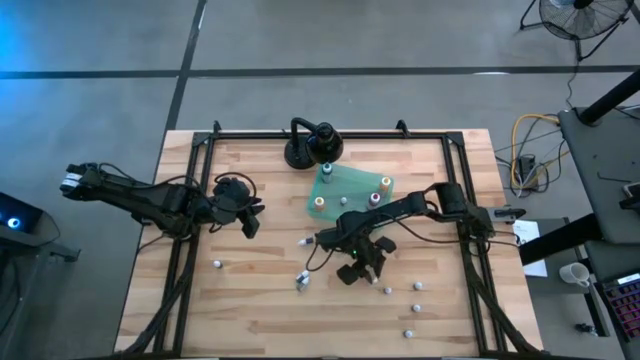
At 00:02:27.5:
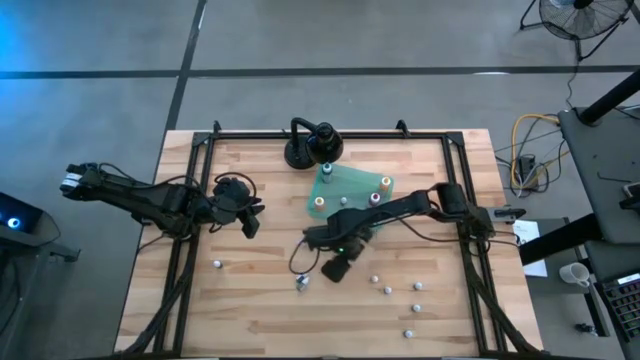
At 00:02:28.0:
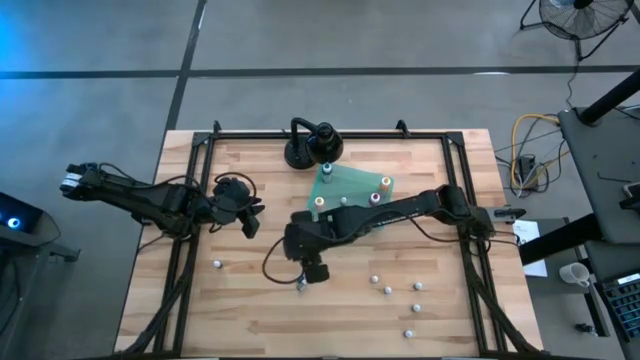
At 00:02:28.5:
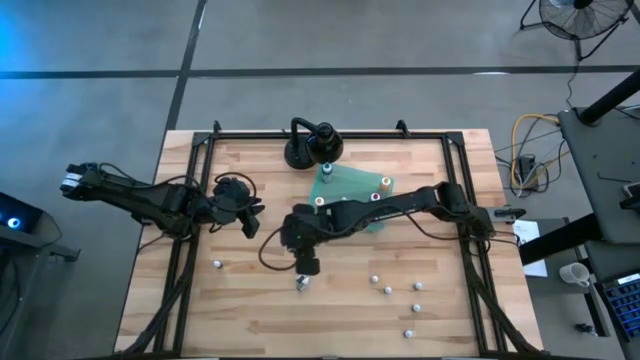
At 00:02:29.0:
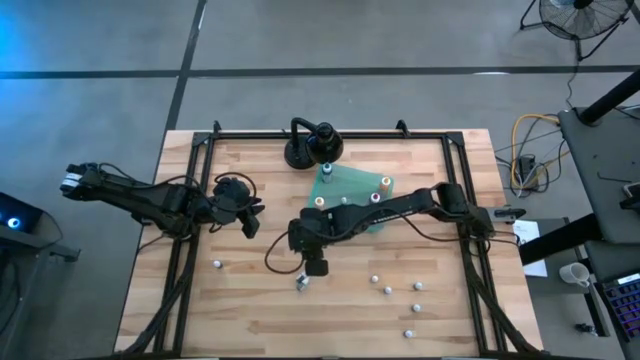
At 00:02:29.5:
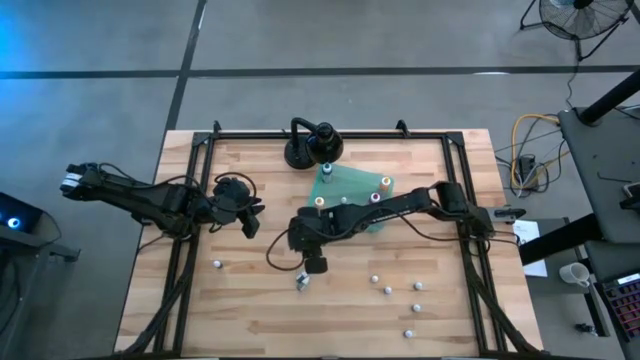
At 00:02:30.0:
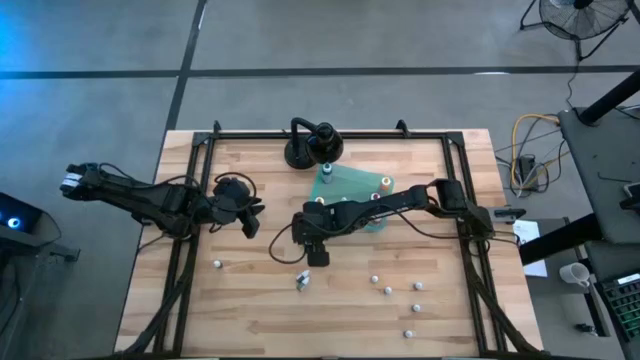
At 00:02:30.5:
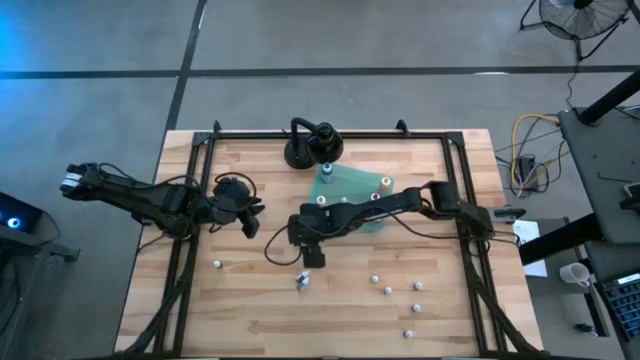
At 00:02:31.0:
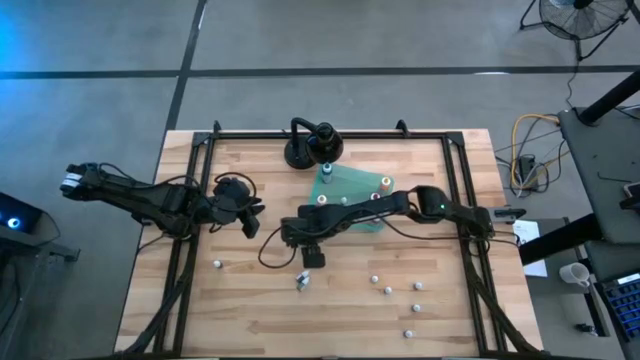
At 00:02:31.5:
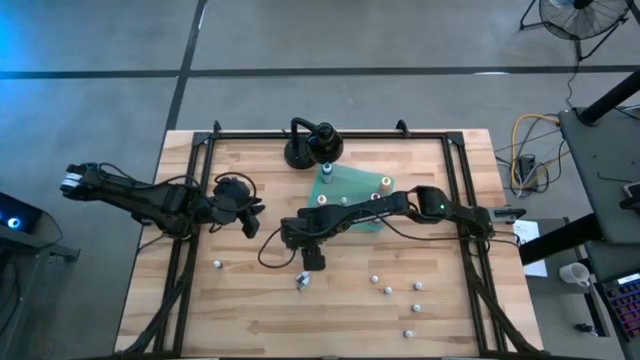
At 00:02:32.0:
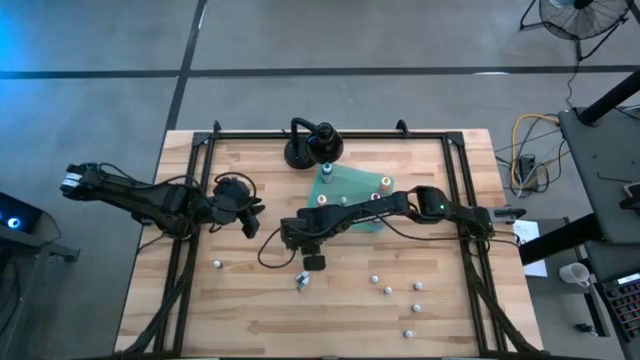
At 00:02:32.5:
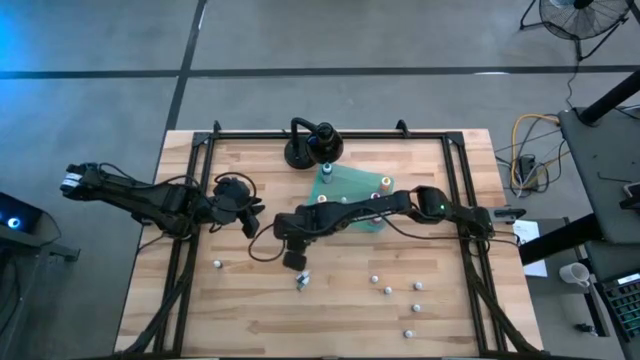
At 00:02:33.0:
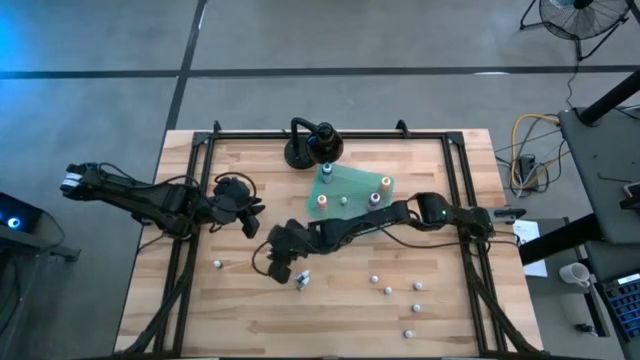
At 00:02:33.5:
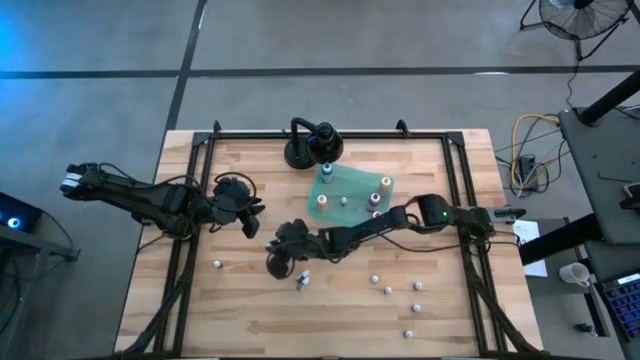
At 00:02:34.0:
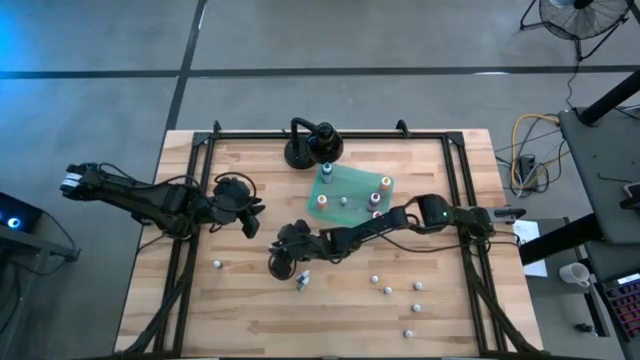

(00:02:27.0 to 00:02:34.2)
Task: Pick & Place food coloring
Move the violet food coloring bottle to the middle left of the table

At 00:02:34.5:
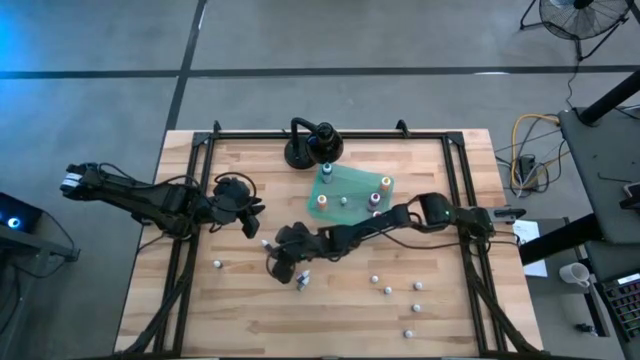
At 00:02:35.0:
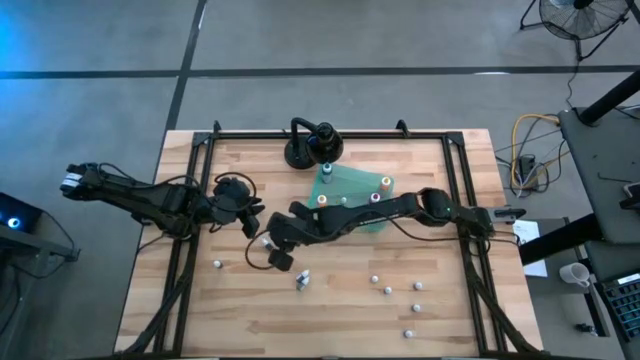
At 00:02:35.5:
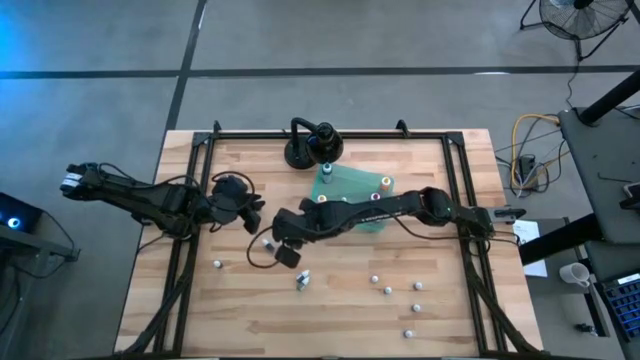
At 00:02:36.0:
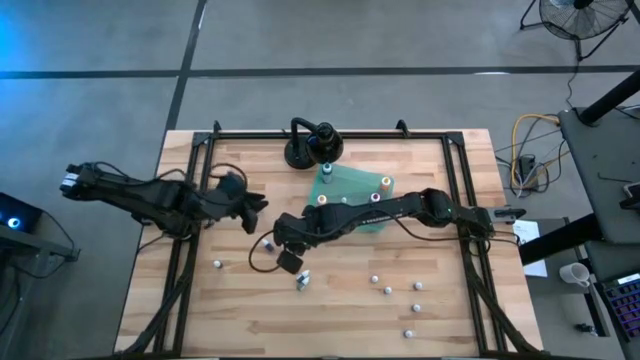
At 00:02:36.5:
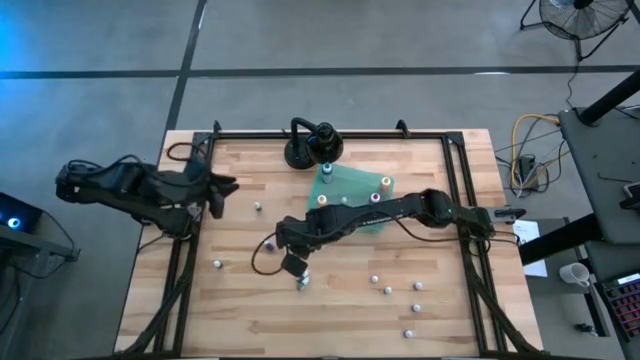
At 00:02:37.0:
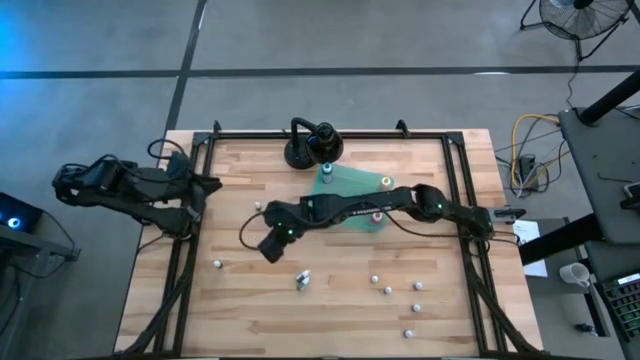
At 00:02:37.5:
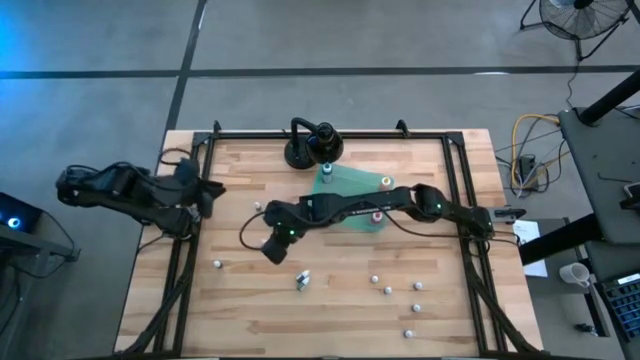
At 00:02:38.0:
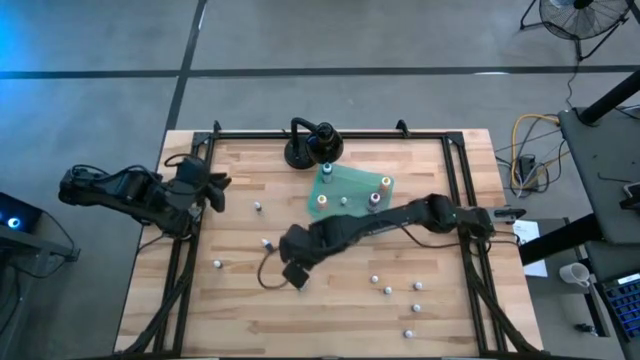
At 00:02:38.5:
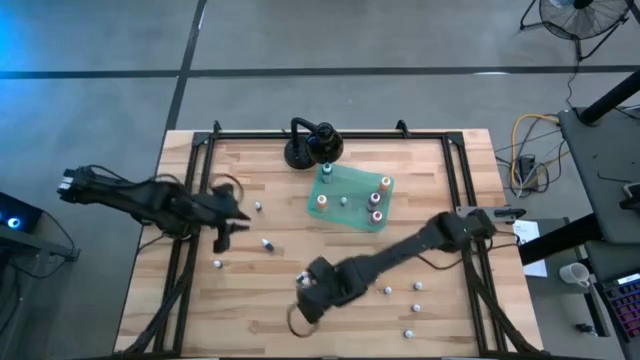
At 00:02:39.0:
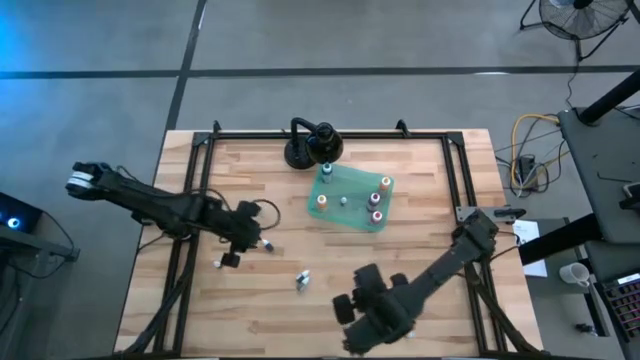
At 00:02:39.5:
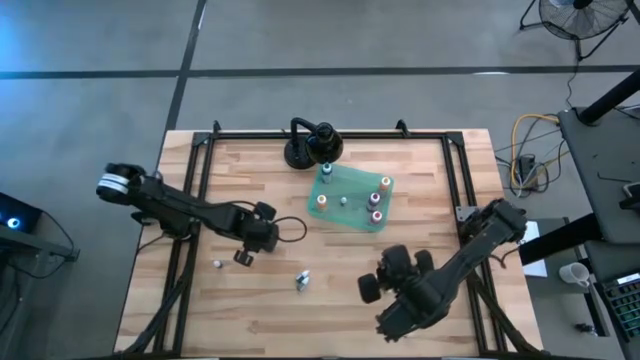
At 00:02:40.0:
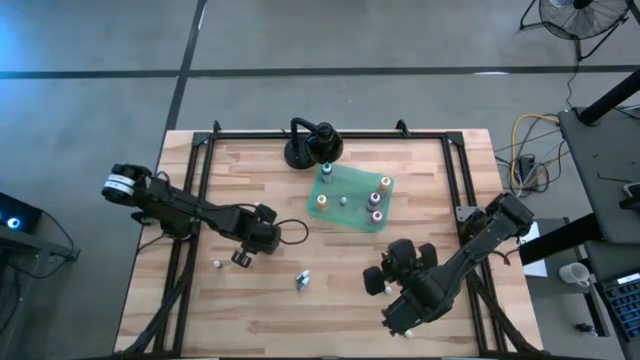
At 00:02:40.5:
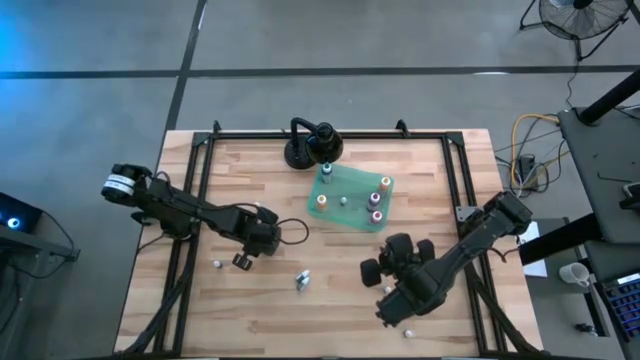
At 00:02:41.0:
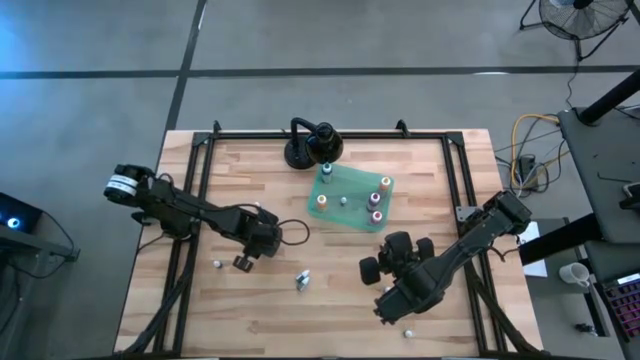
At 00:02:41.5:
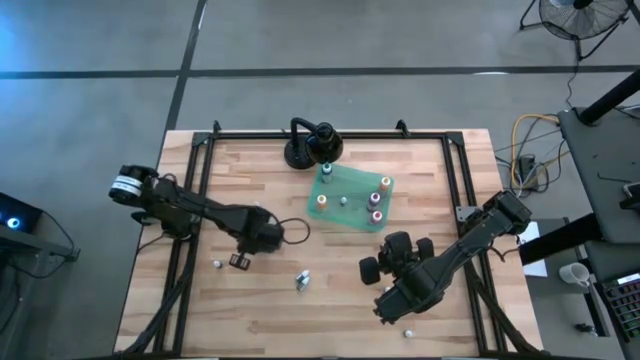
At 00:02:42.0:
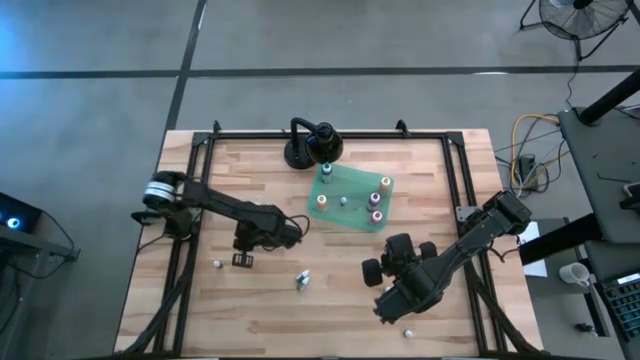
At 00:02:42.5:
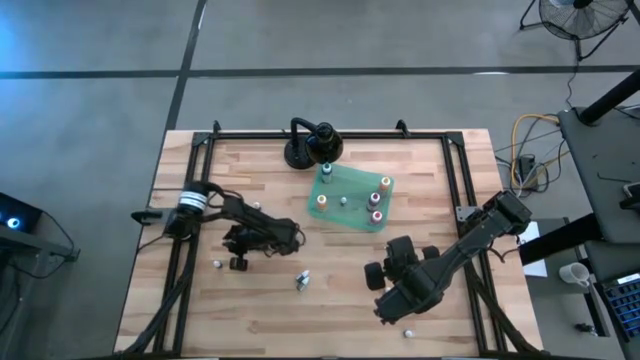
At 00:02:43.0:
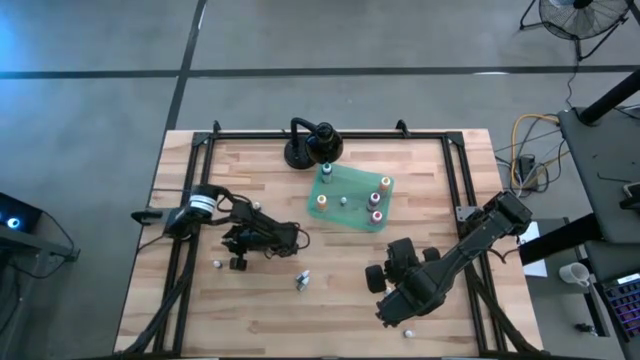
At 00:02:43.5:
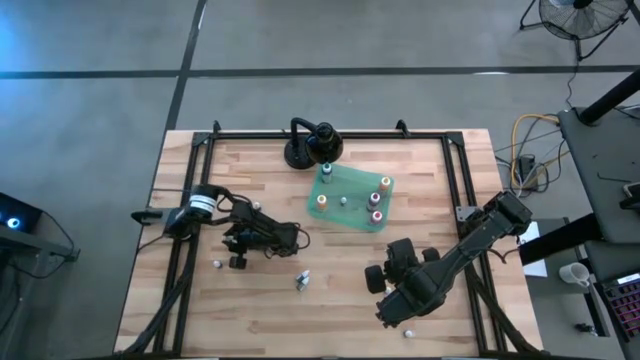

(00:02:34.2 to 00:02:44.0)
Move the violet food coloring bottle to the middle left of the table

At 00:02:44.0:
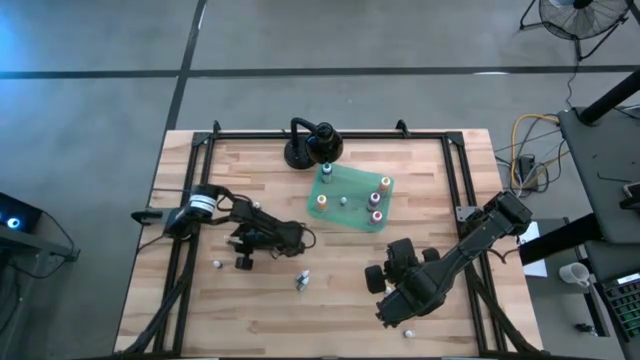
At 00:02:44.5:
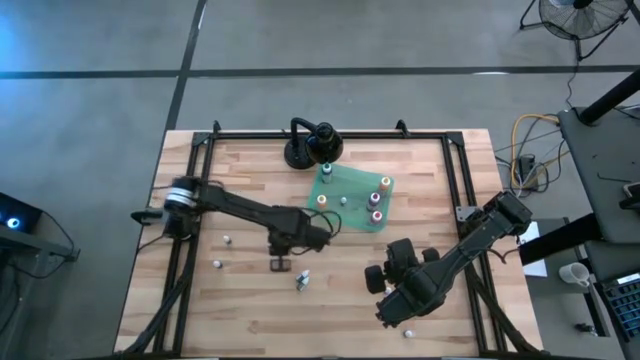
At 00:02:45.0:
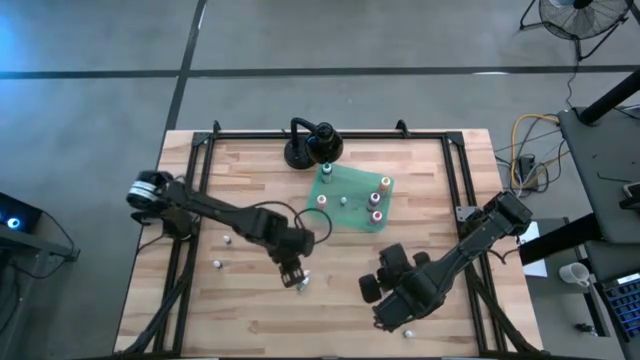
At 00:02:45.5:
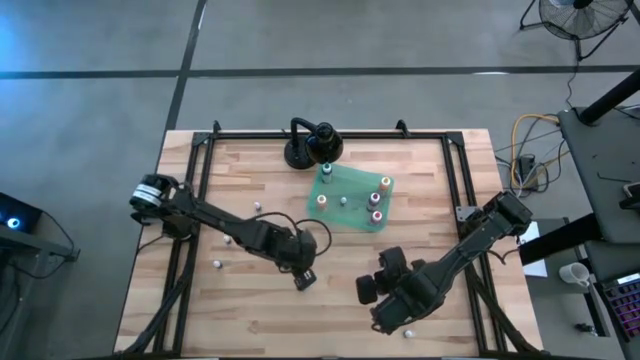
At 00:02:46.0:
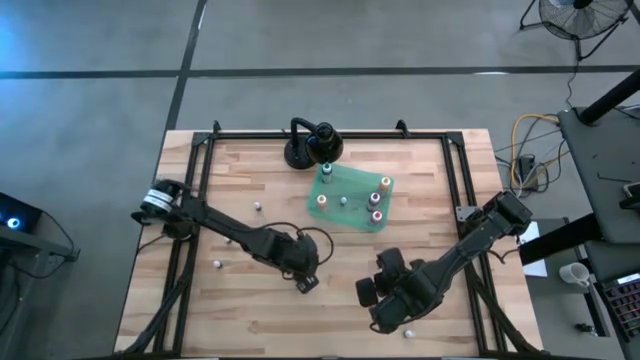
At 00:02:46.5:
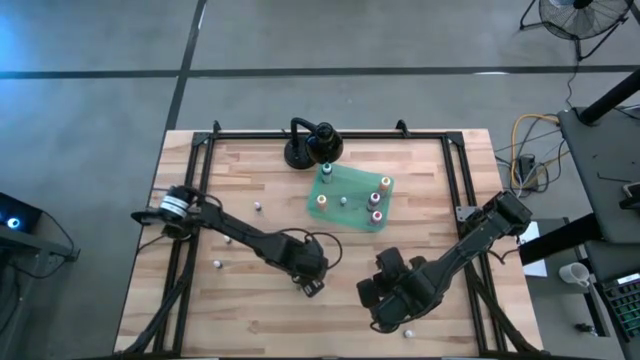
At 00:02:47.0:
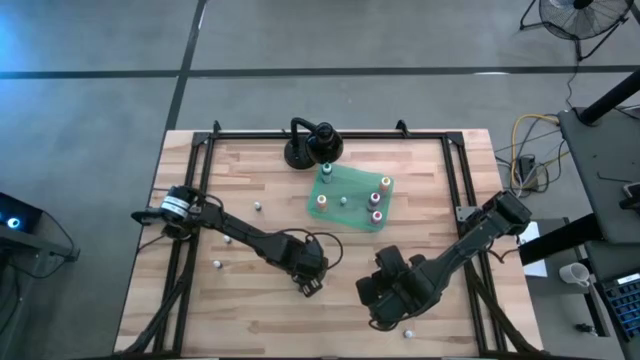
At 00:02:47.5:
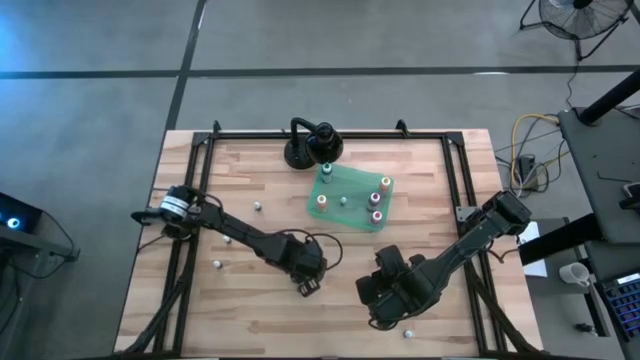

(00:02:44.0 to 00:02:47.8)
Move the red food coloring bottle to the middle left of the table
